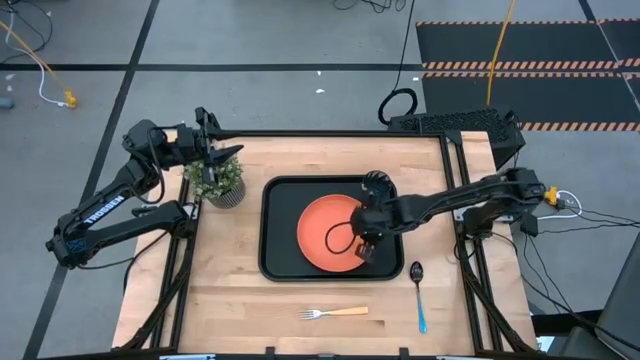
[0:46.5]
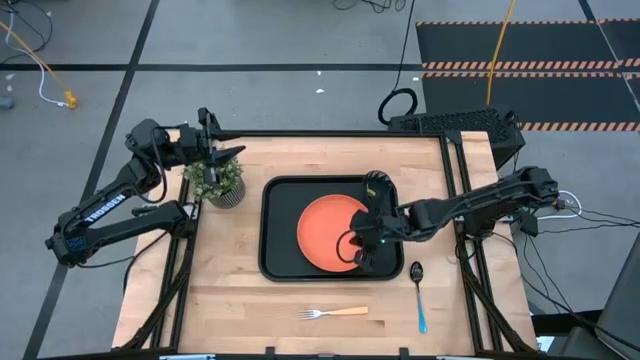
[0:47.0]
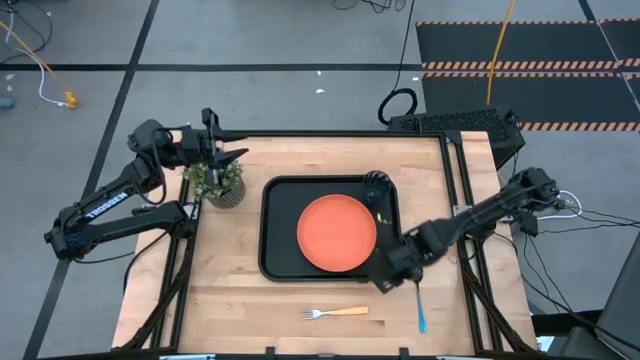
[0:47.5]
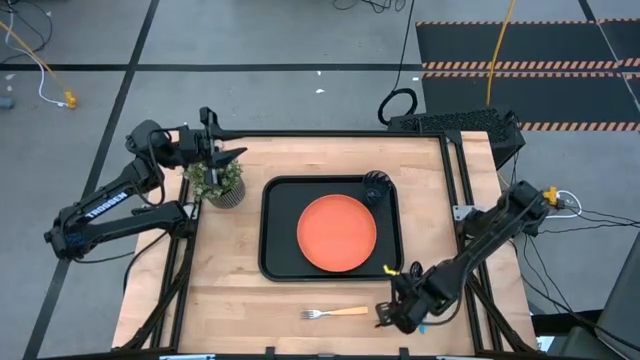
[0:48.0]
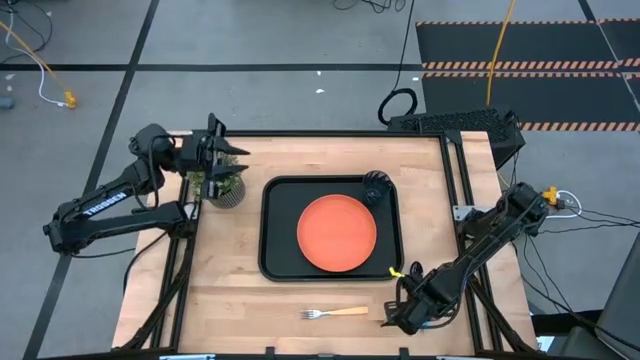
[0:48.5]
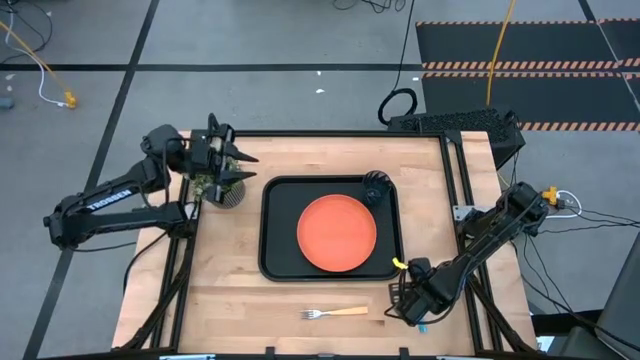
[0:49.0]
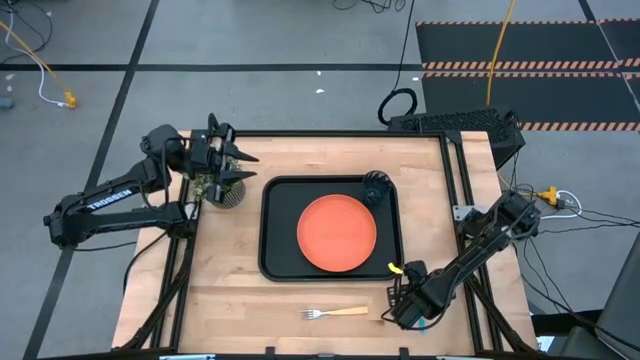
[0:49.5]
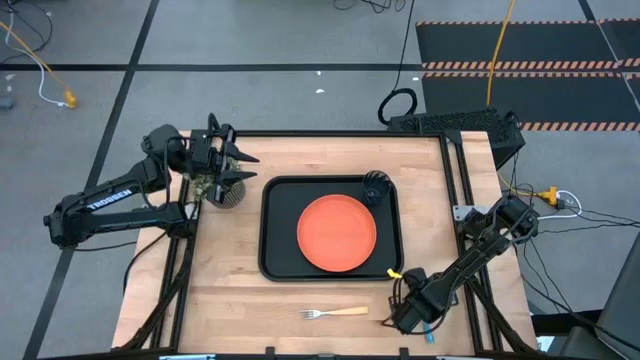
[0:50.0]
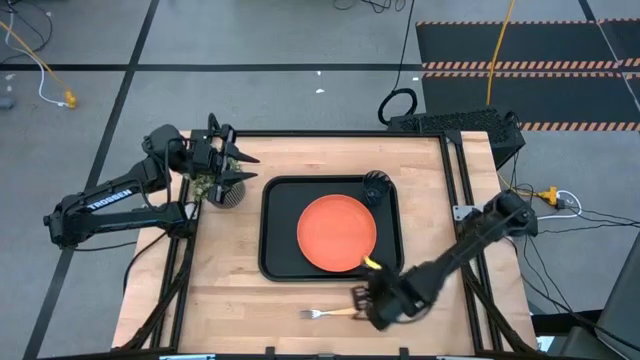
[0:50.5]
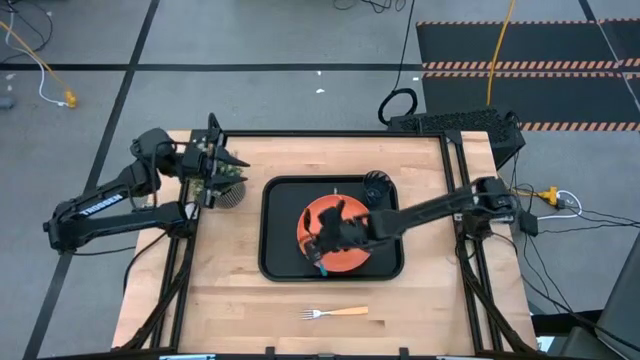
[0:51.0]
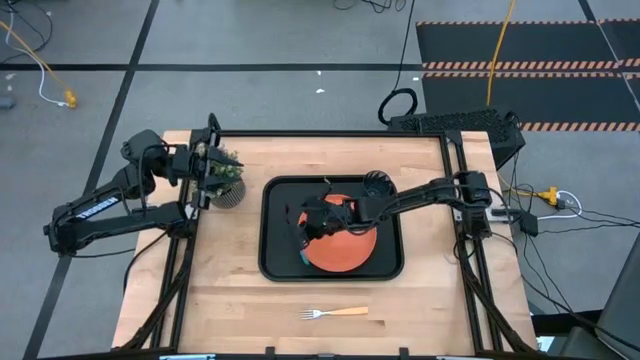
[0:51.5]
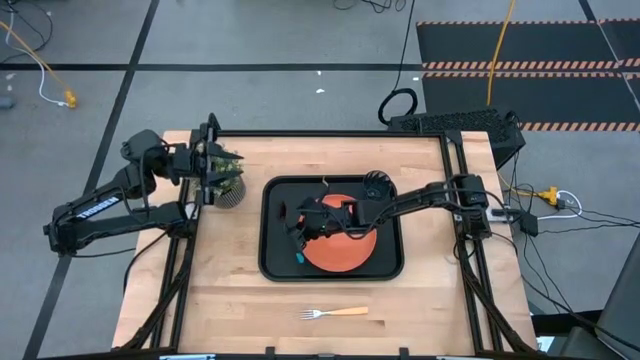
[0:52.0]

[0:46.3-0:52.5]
Task: Pick and place plate/cup/fork/spoon on tray
Put the blue spoon on the black serving tray

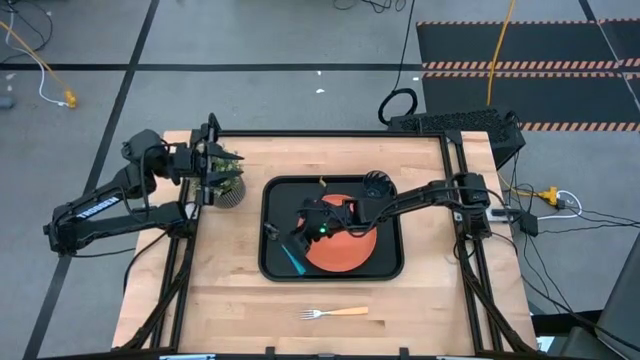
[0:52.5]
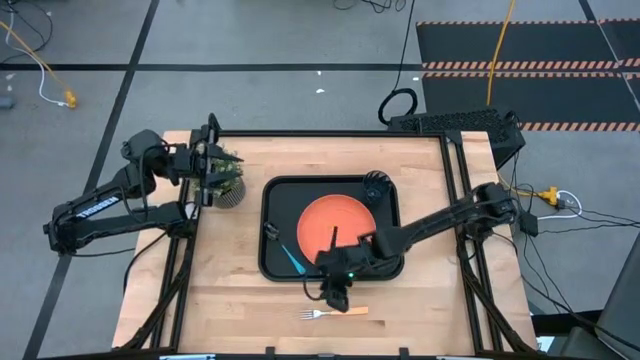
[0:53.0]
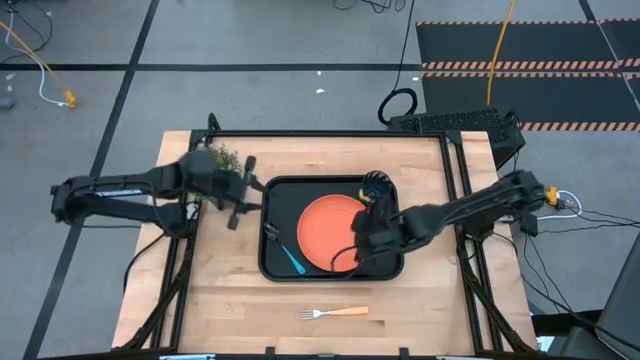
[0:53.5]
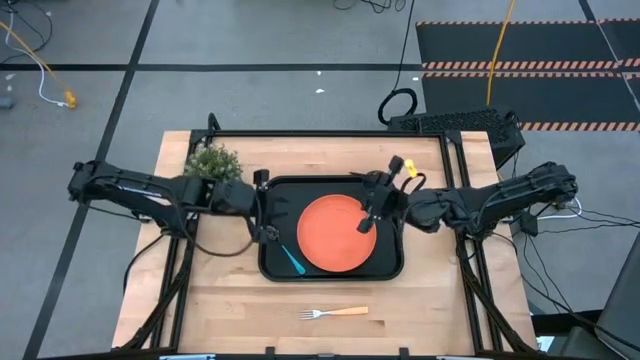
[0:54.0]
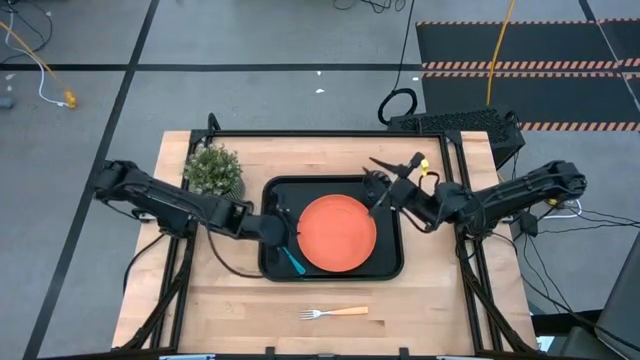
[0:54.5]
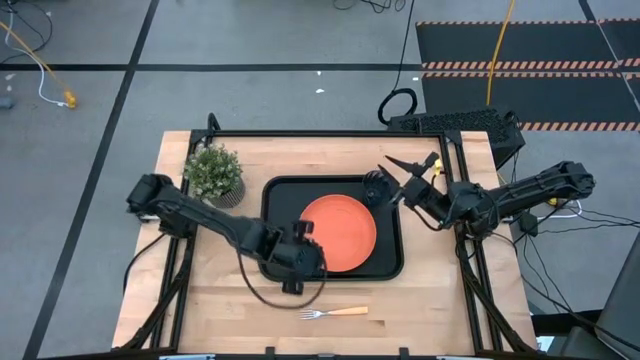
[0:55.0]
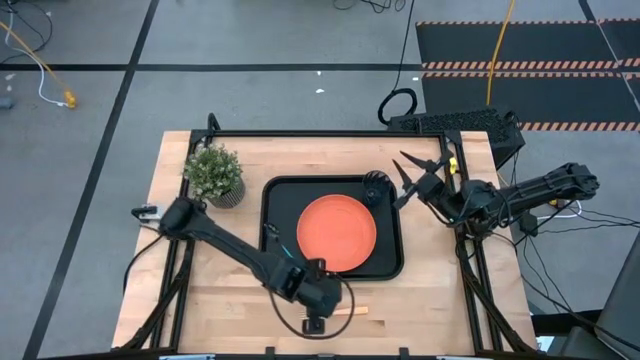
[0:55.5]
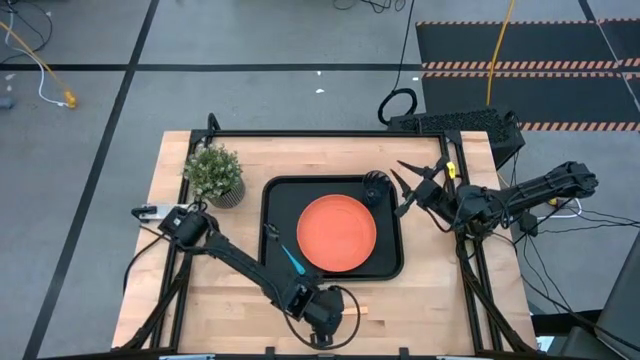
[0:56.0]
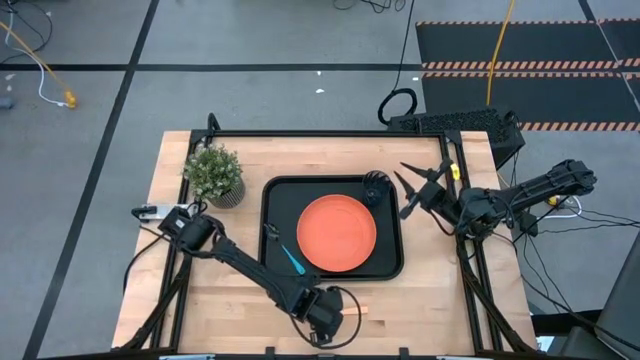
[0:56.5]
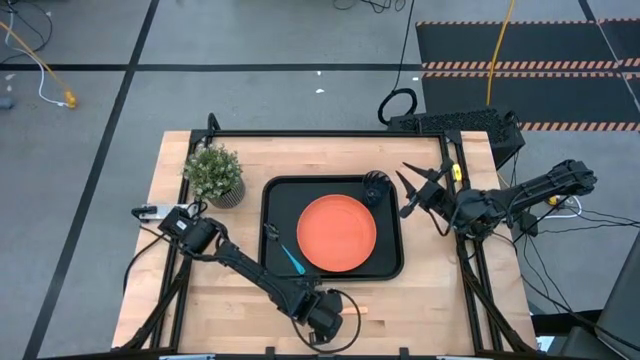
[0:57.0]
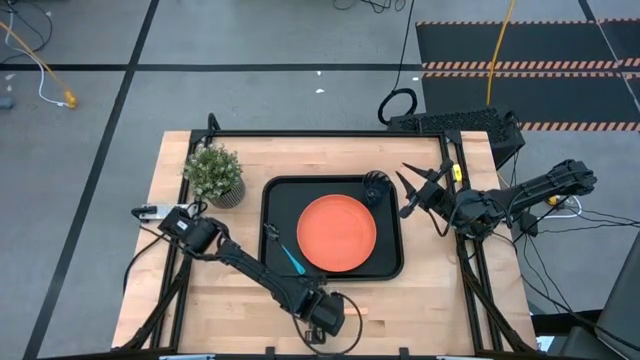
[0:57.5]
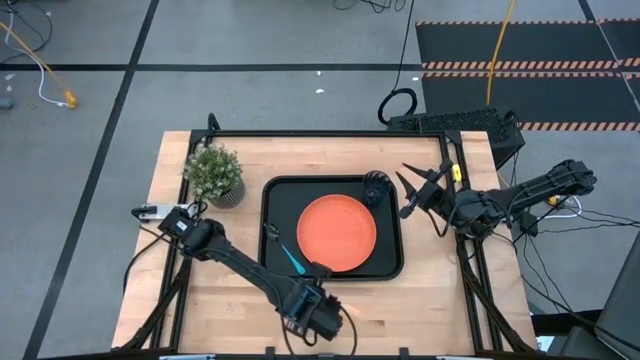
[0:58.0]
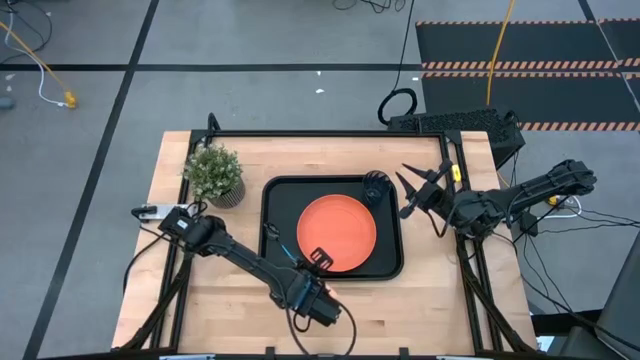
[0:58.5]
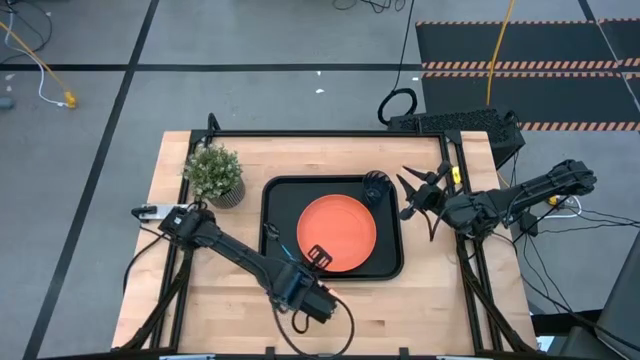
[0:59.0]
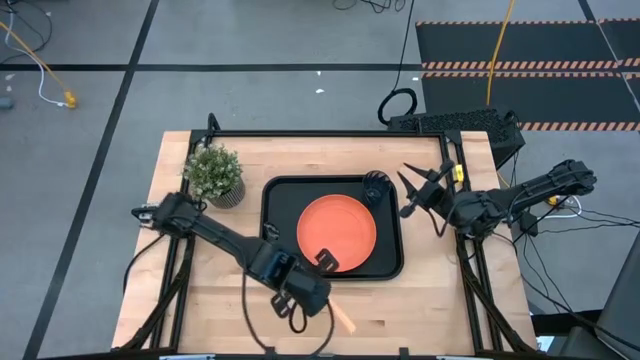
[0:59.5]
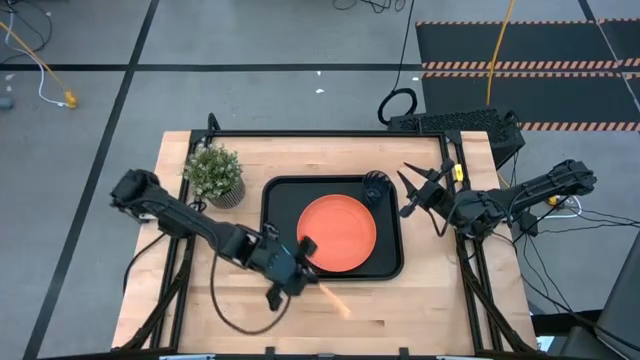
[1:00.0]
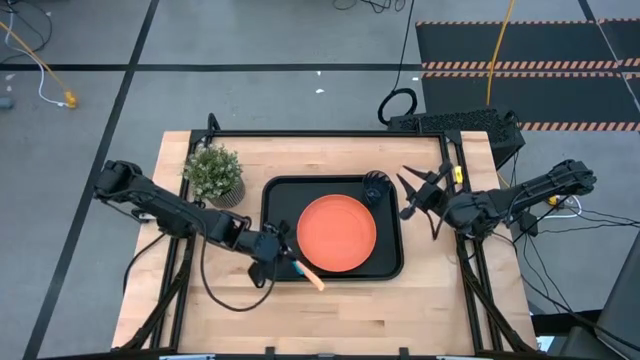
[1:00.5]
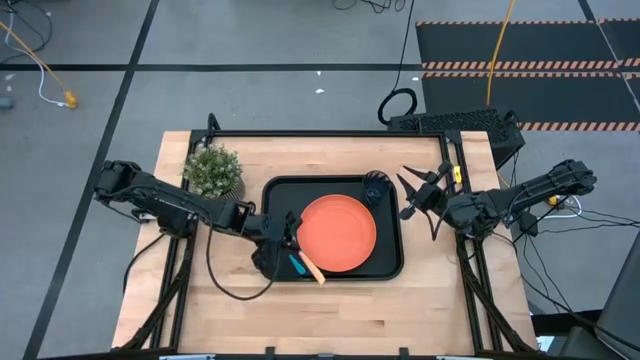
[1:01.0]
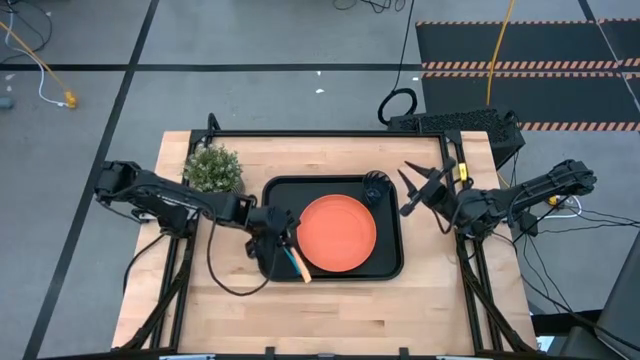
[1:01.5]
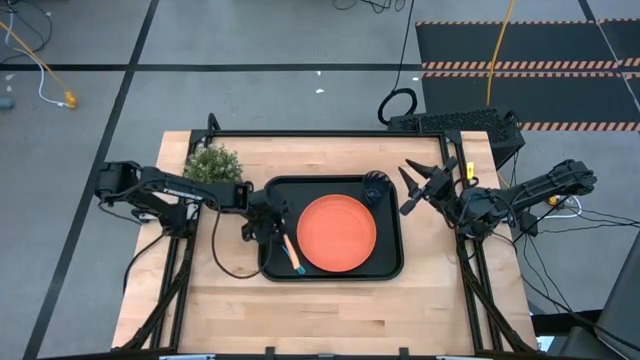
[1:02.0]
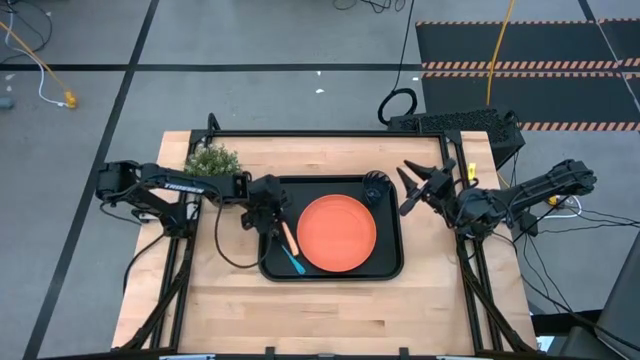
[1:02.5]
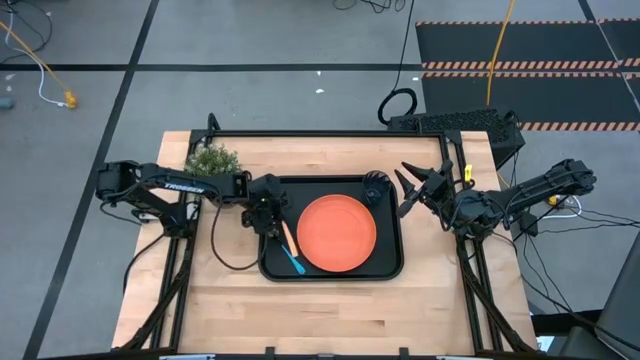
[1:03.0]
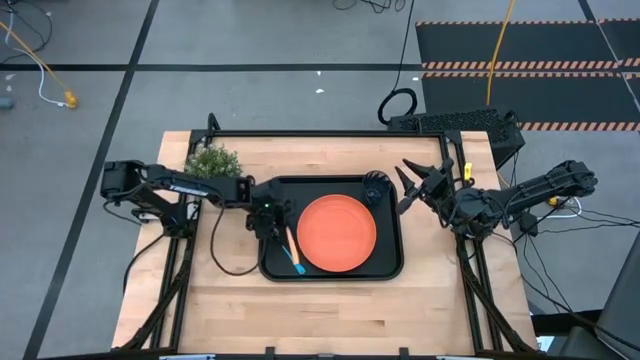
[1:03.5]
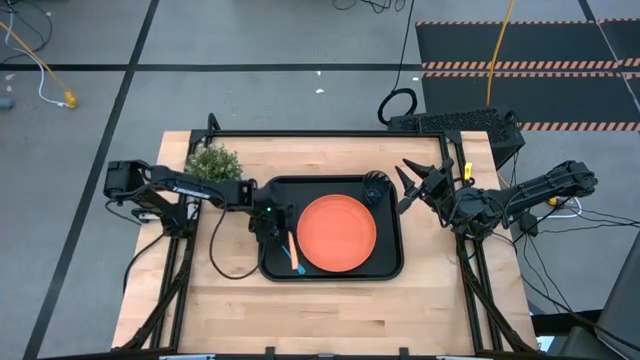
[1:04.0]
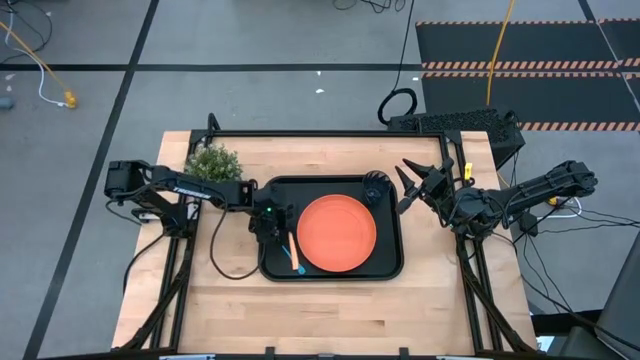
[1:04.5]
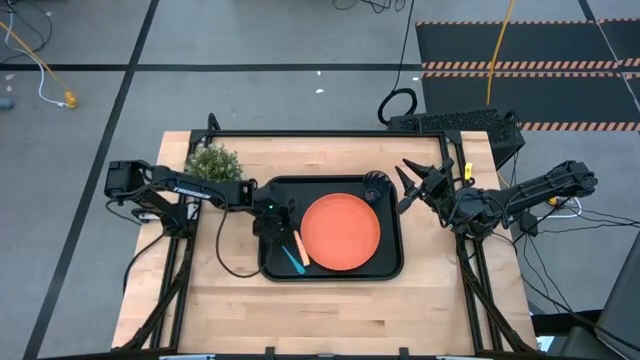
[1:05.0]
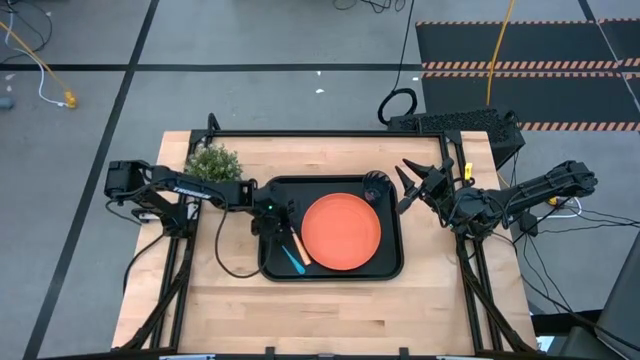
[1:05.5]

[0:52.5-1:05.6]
Put the light orange fork on the black serving tray

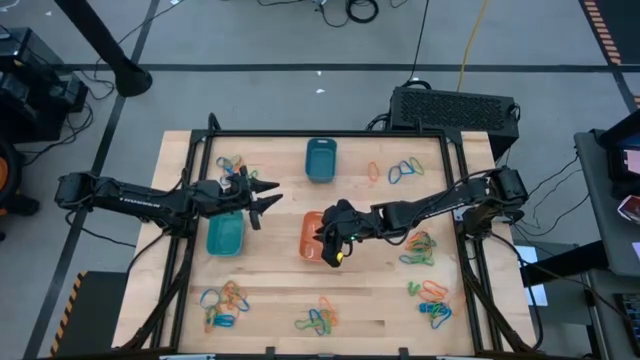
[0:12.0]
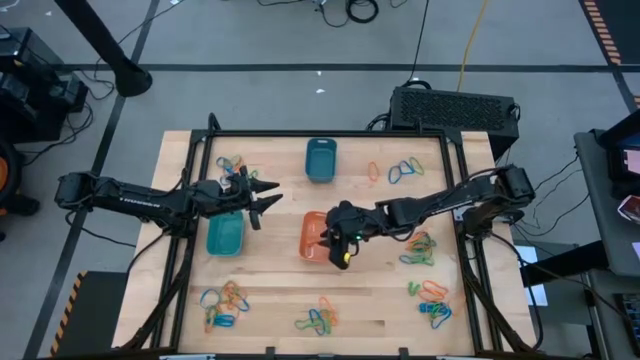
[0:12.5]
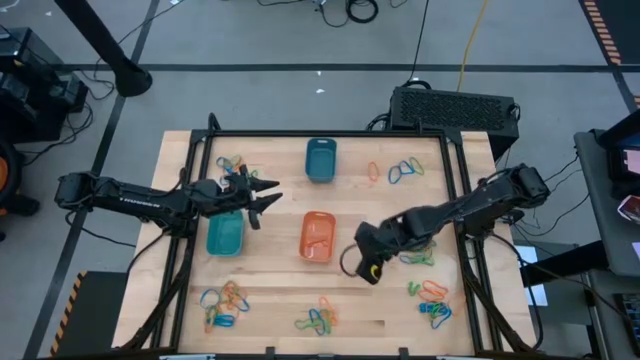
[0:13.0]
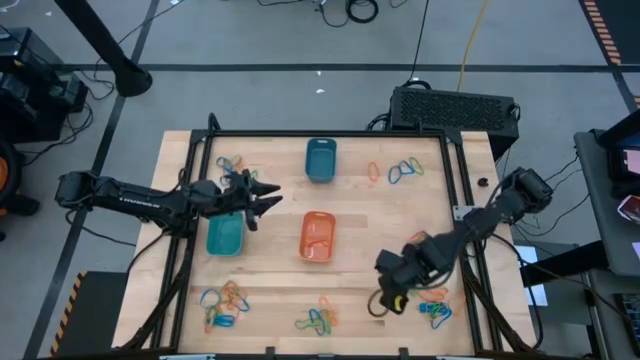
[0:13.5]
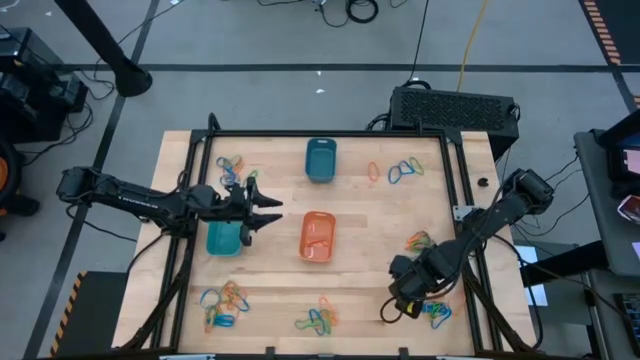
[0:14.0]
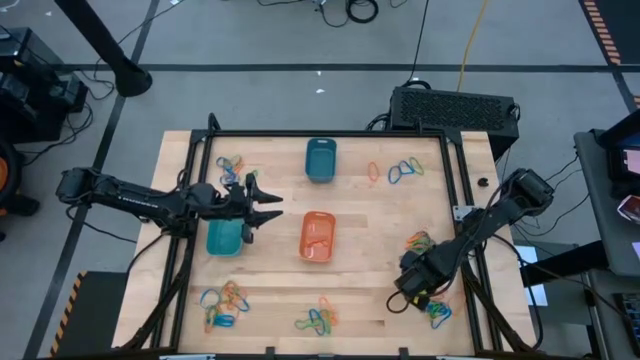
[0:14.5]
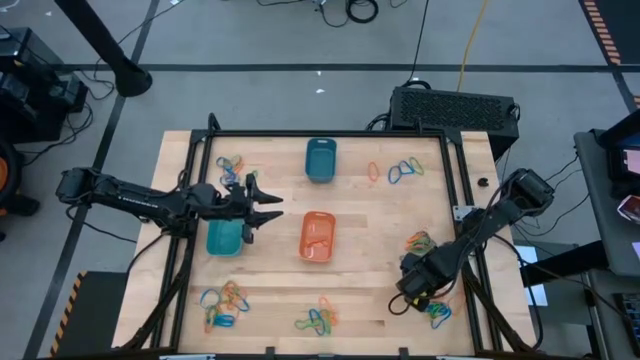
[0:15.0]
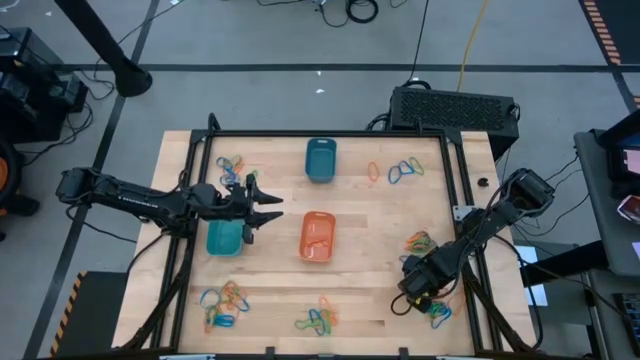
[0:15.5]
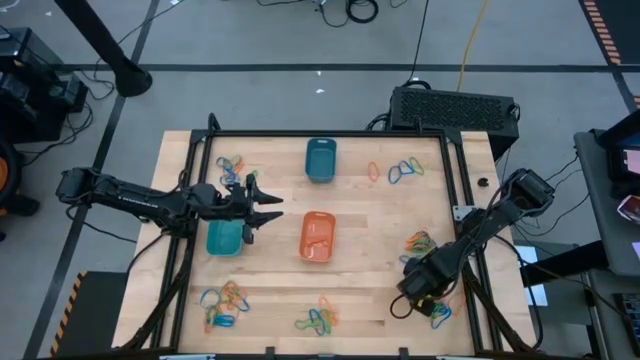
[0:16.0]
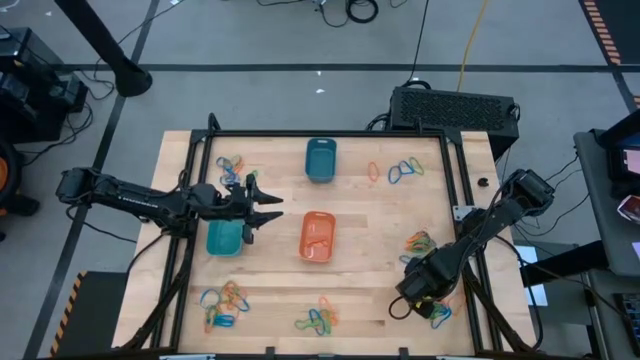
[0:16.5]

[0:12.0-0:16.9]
Task: Sort rubber bands into baskets
Put the orange rubber band into the orange bin
